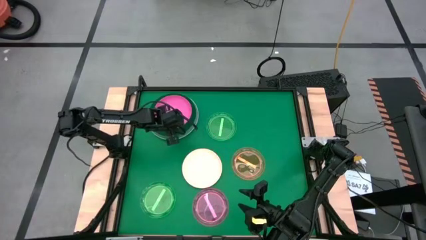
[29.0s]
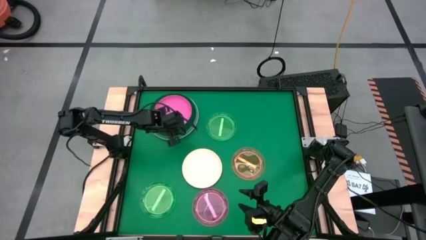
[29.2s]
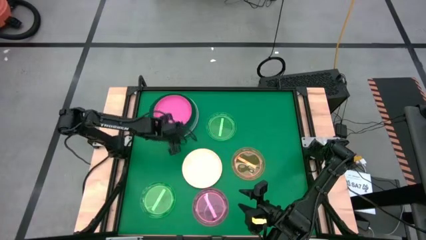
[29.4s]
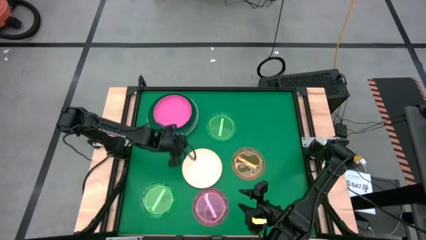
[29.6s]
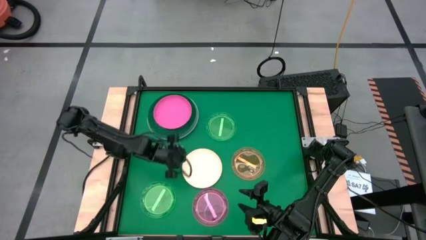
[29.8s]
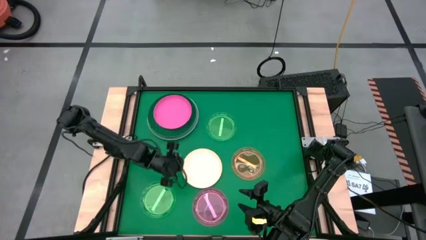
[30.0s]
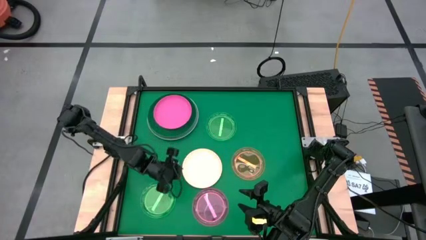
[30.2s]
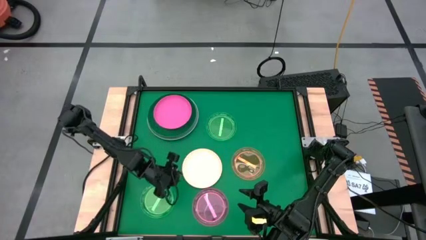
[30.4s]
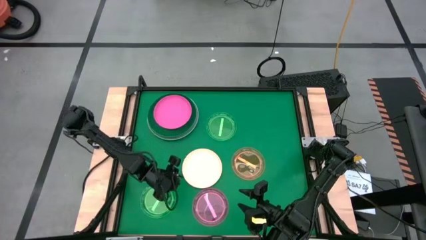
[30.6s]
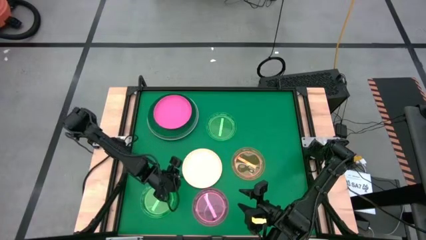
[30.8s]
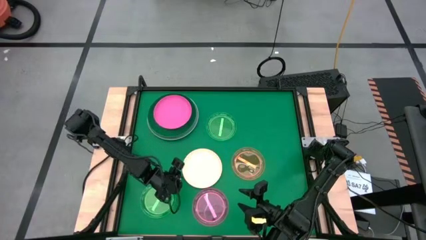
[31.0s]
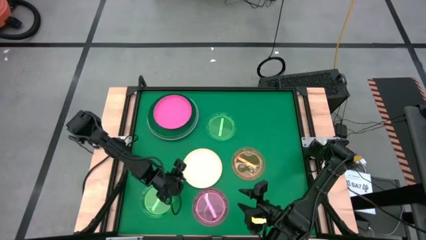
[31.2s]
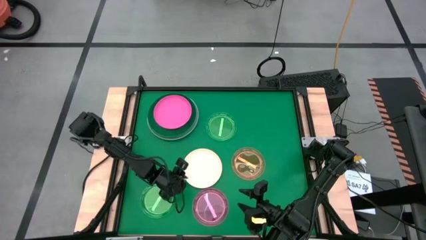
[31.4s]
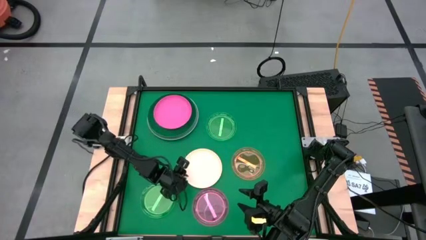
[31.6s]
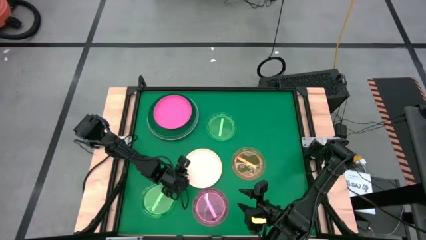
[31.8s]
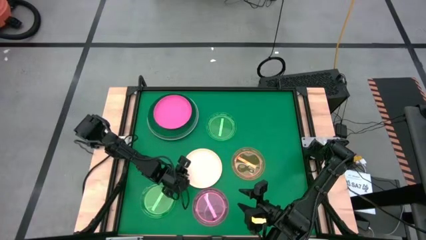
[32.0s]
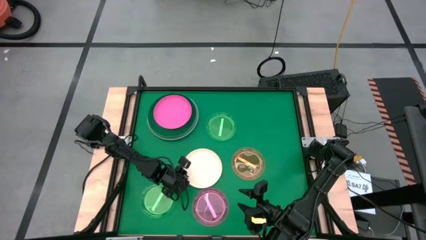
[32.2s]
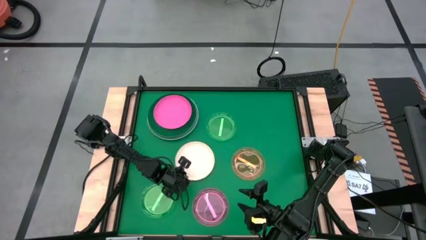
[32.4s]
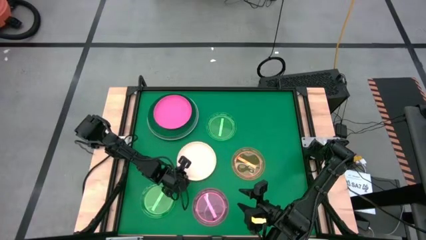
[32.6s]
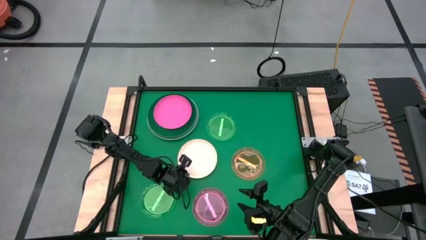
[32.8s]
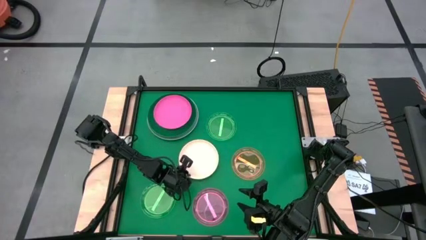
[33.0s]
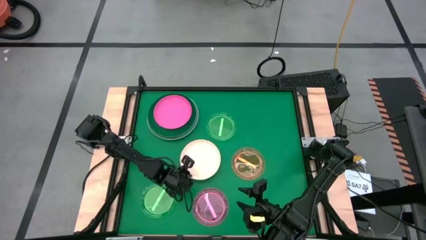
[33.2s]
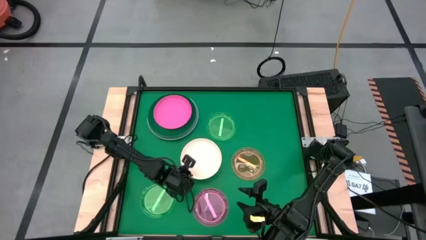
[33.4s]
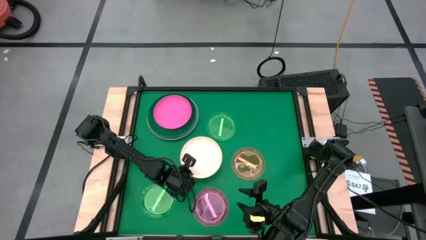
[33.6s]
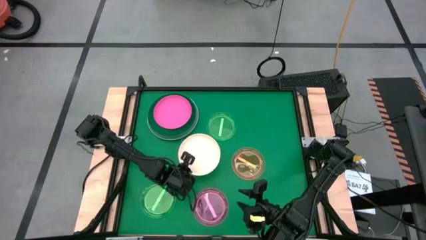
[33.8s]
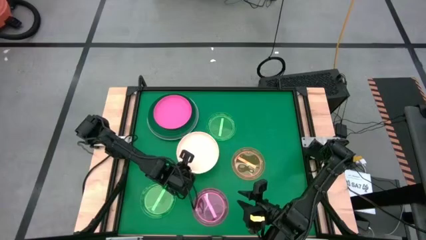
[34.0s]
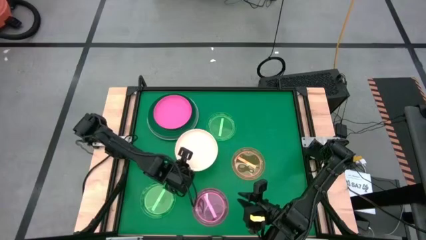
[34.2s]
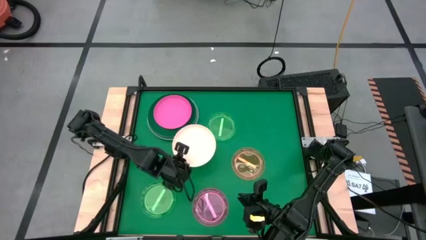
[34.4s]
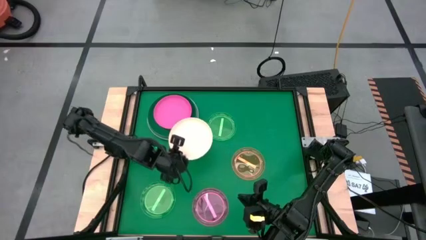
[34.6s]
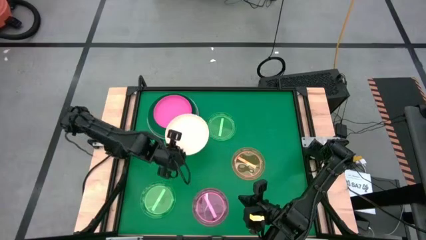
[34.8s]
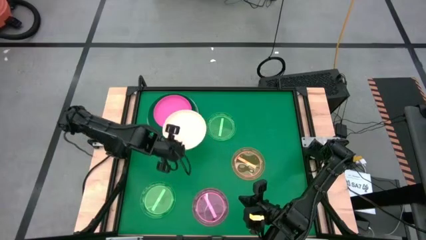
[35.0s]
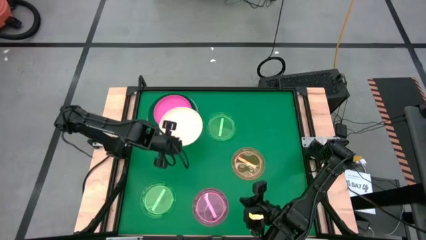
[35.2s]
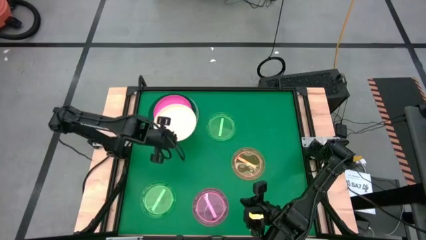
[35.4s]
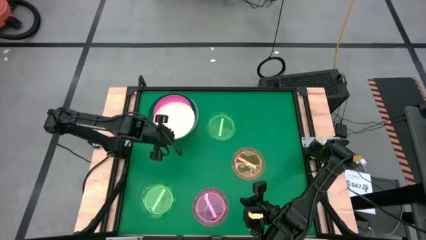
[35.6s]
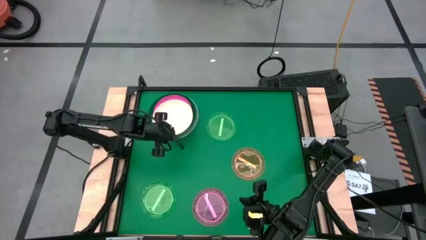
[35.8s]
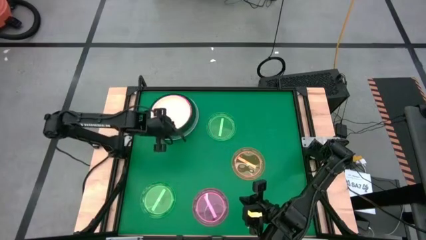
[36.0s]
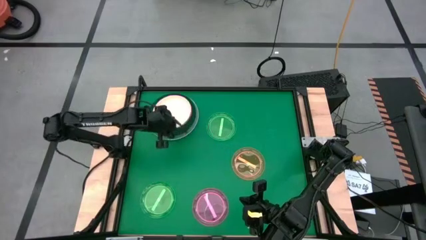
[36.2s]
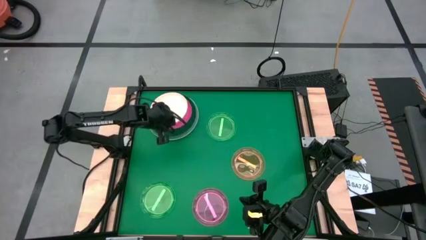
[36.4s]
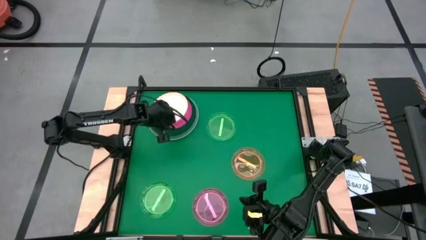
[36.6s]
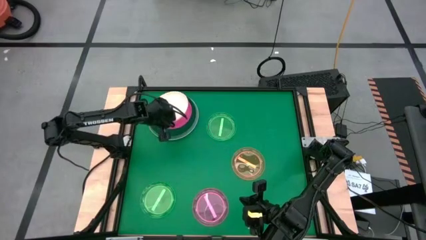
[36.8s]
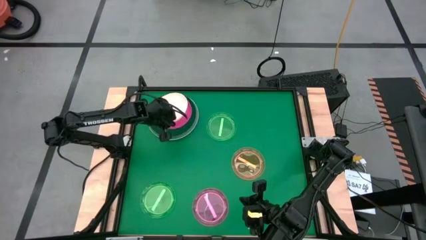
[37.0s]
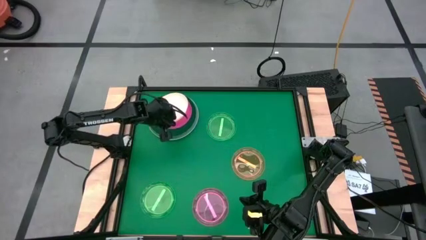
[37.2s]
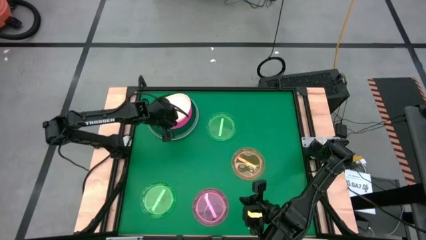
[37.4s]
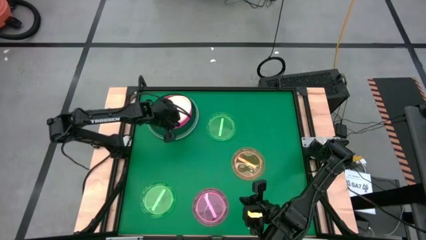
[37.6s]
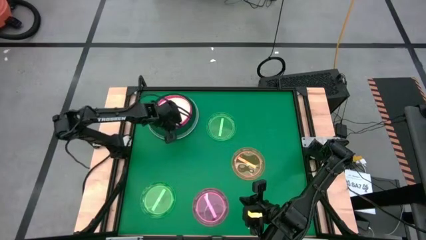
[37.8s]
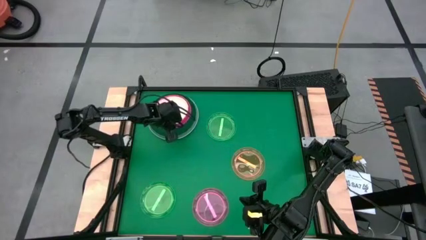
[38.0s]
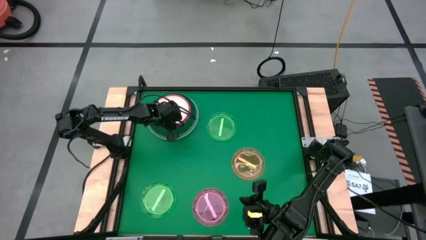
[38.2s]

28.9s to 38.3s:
Task: Stack plastic plates
Stack the white plate on the pink plate

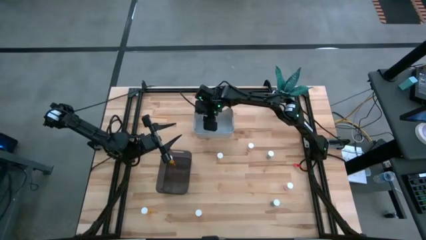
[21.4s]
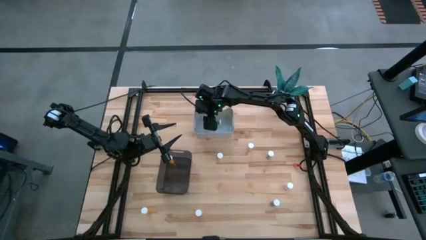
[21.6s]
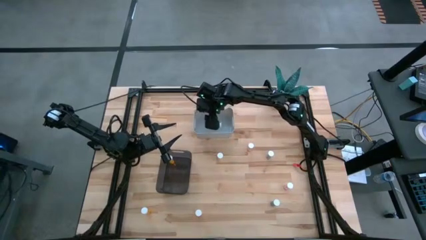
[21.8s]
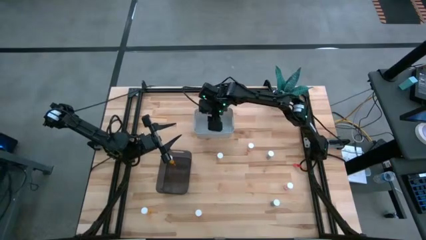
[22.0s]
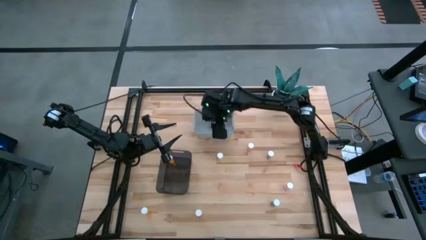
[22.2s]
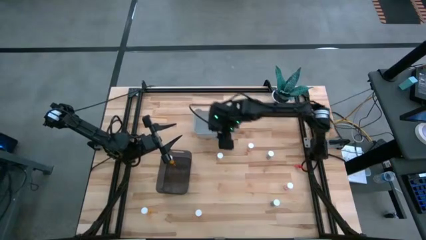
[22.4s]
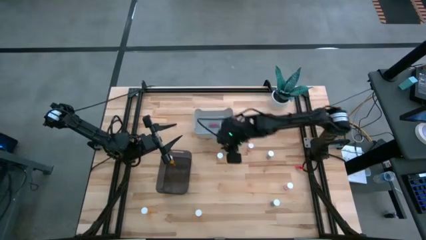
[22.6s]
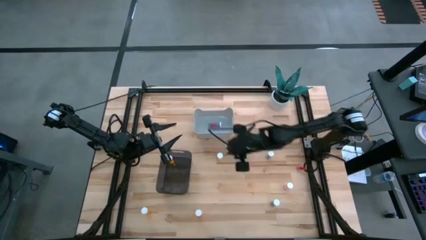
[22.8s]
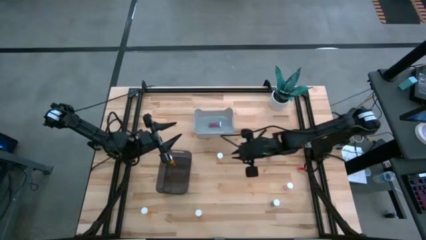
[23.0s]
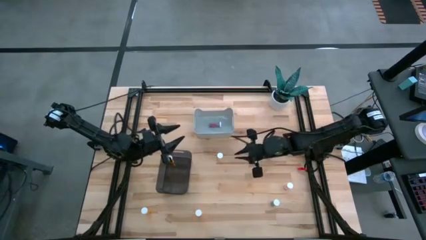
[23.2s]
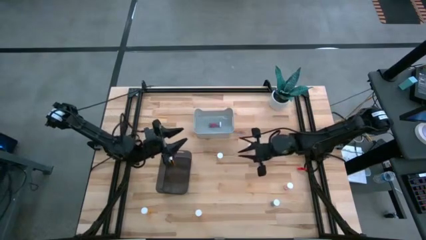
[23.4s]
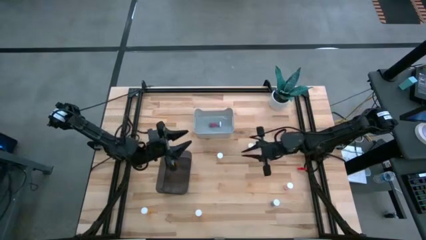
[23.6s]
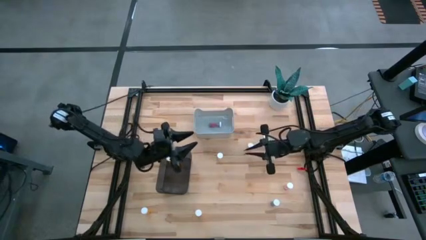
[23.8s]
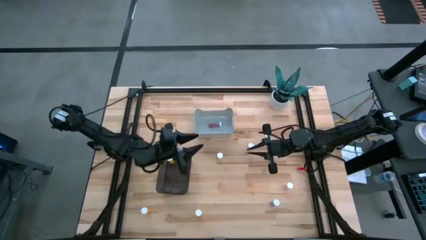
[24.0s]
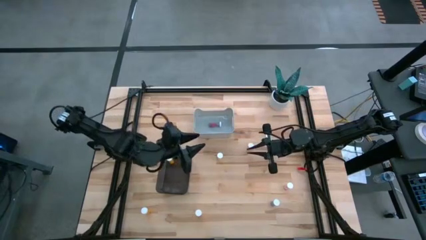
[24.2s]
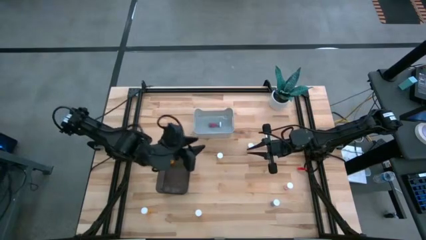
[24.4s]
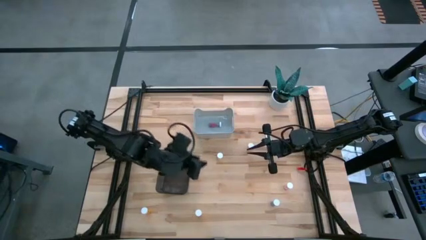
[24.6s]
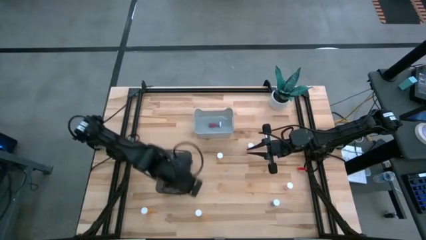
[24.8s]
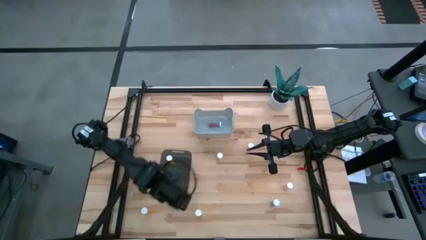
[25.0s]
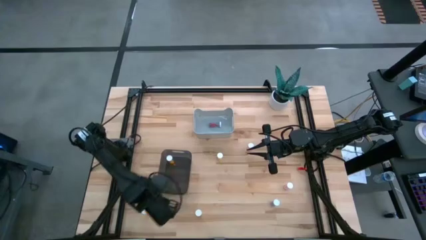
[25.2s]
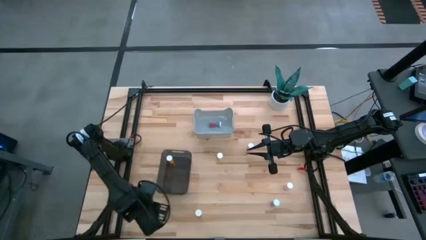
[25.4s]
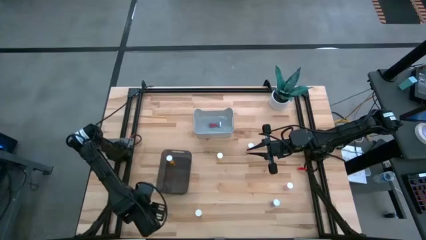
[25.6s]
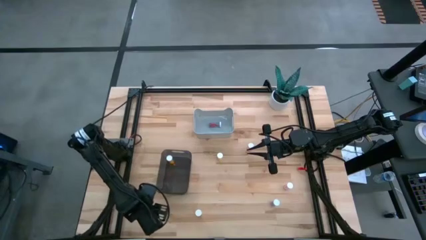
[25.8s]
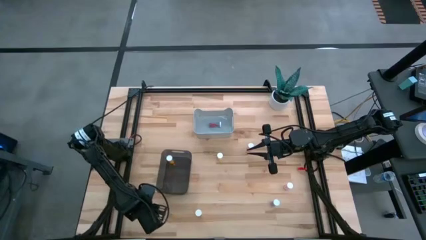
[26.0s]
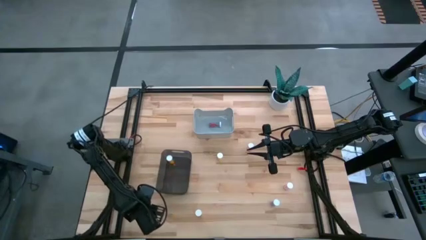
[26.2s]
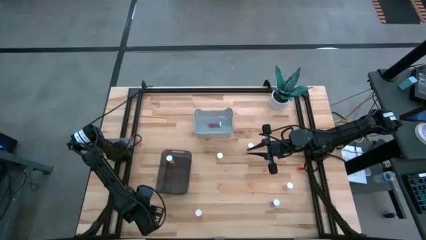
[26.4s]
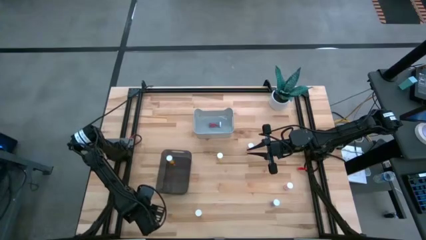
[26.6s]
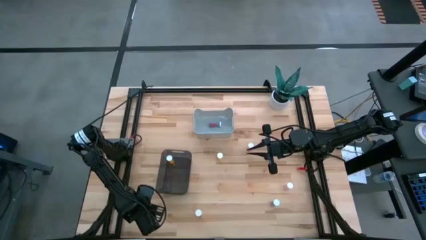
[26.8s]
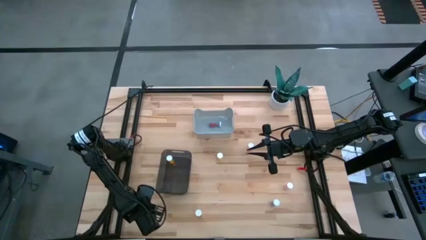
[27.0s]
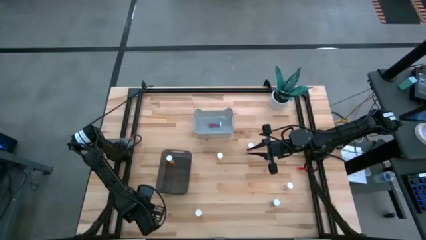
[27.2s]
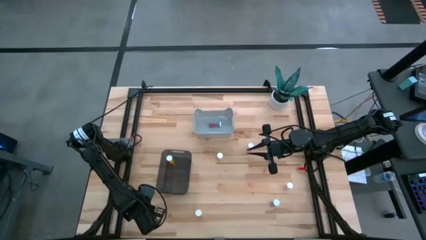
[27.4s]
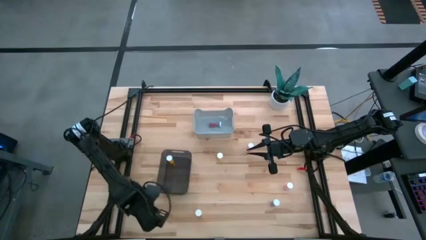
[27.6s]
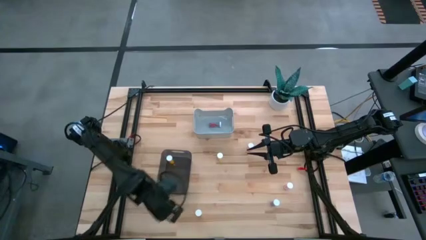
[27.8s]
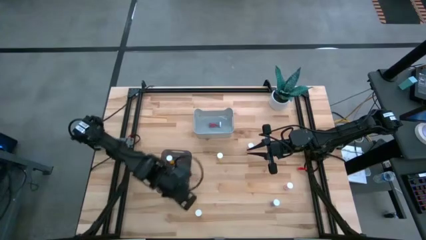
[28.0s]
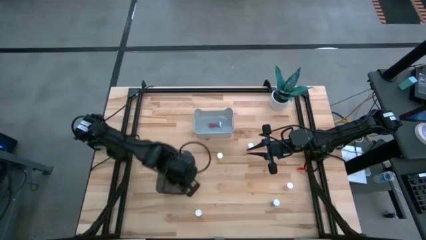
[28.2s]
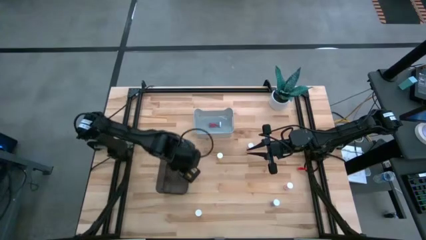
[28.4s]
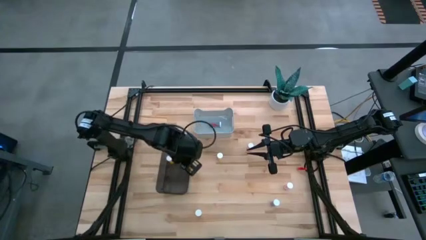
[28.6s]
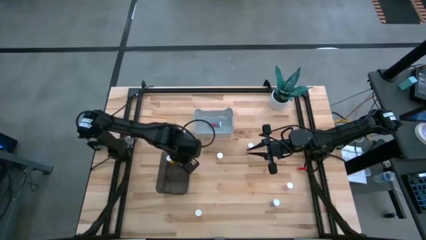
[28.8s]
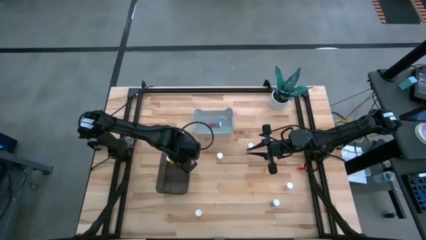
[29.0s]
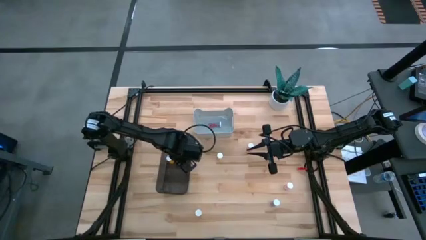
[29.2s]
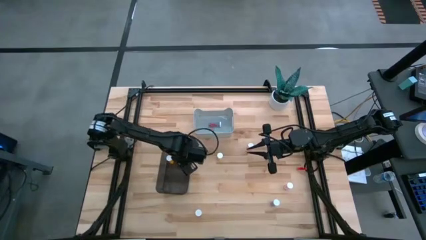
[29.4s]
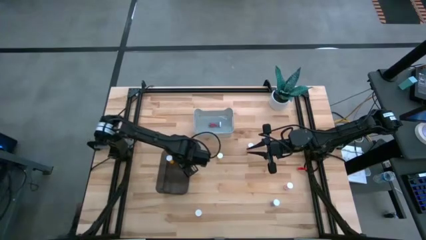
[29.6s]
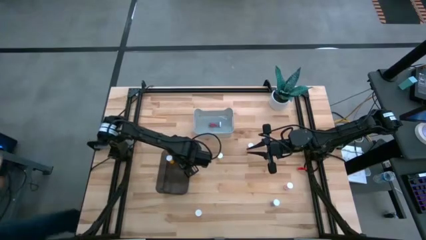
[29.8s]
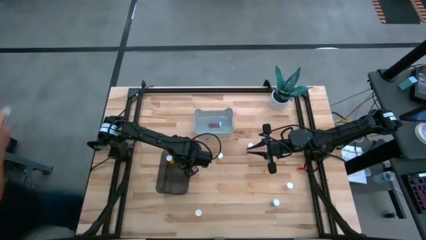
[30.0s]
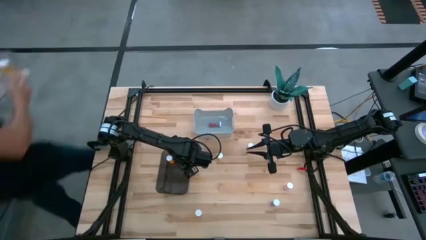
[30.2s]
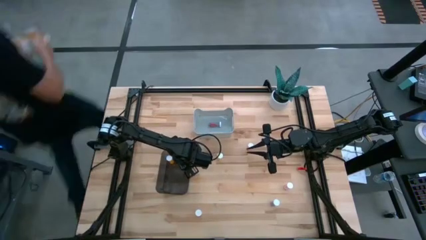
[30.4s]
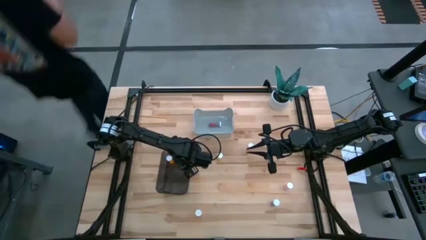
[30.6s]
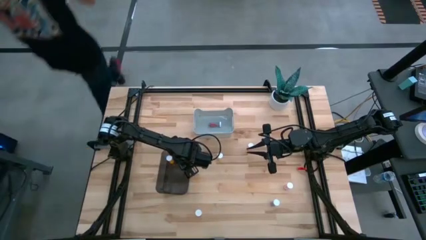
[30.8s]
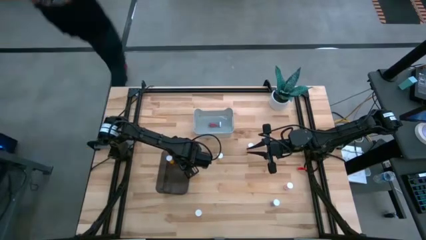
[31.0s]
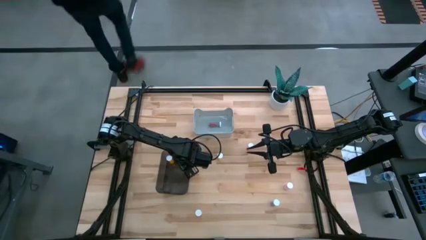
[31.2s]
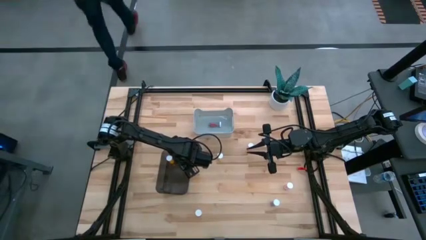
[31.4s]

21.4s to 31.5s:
Task: Pick and place medicine bottles into bin by pill shape (circle, oval)
Put the left orange tablet bottle into the black bin
